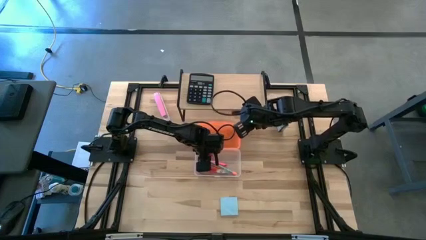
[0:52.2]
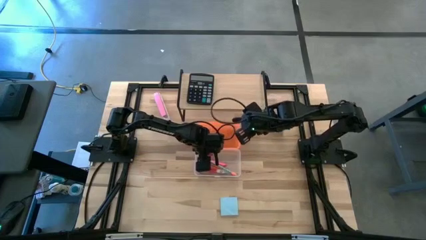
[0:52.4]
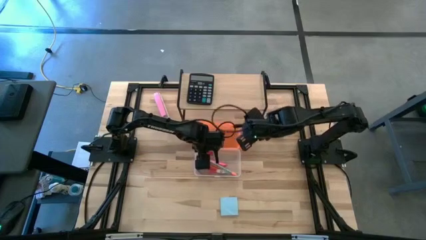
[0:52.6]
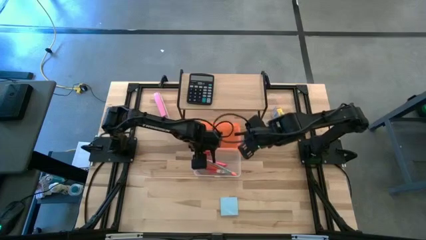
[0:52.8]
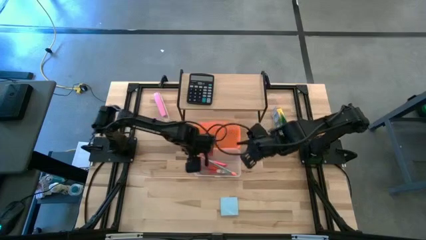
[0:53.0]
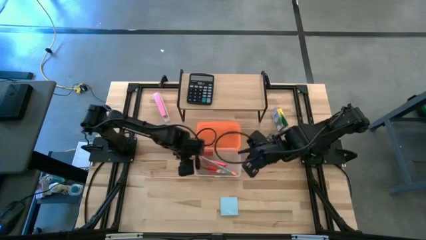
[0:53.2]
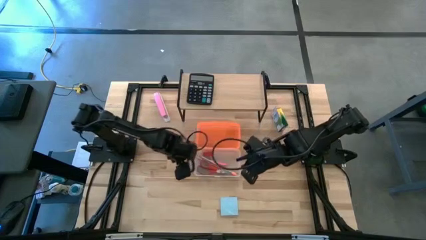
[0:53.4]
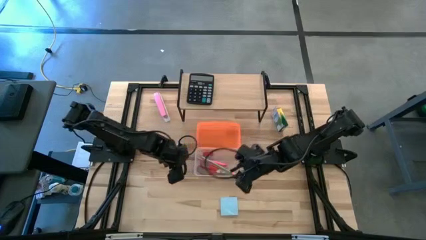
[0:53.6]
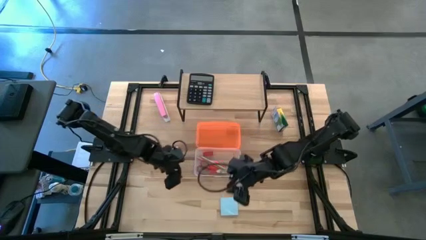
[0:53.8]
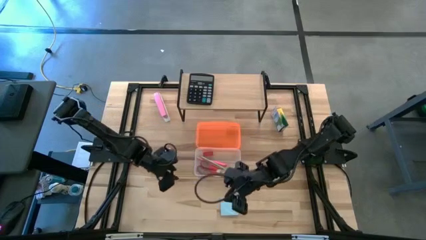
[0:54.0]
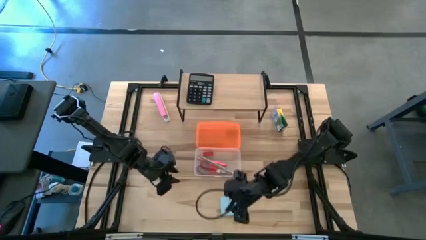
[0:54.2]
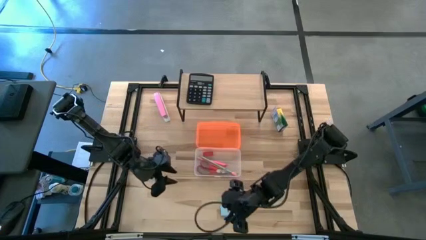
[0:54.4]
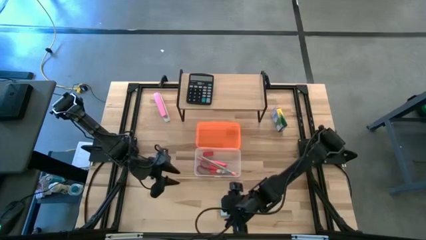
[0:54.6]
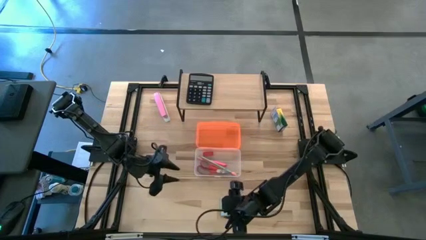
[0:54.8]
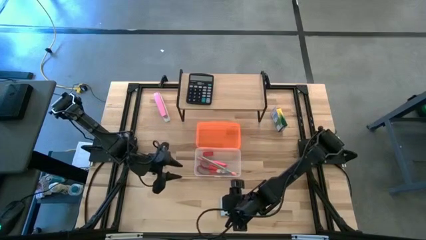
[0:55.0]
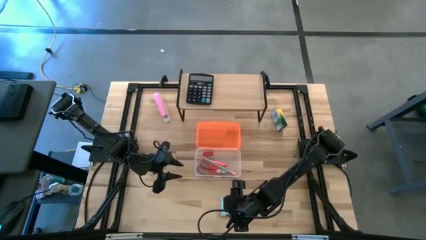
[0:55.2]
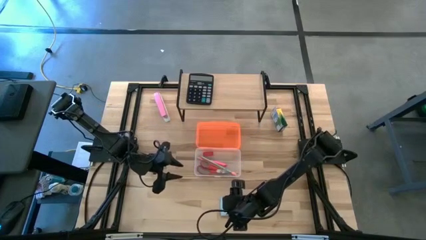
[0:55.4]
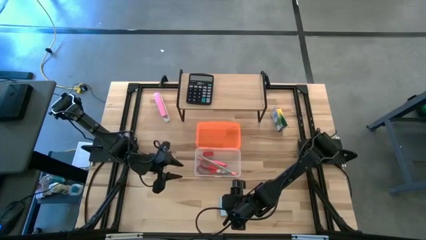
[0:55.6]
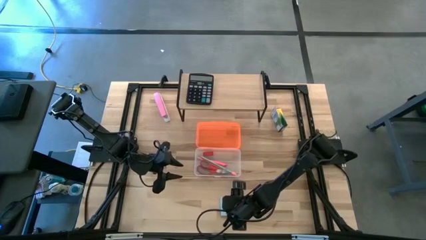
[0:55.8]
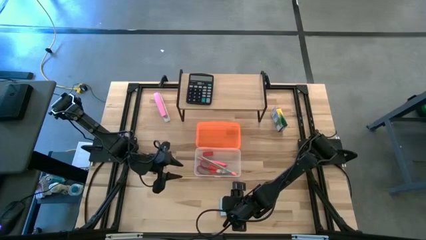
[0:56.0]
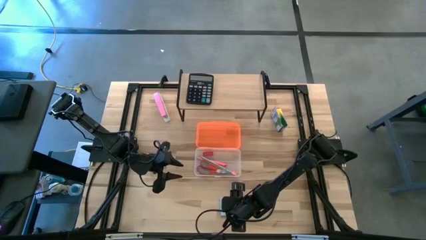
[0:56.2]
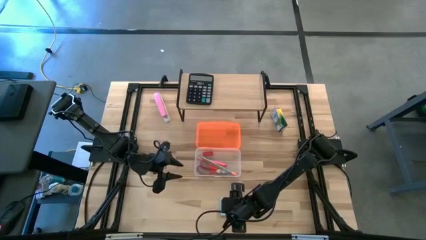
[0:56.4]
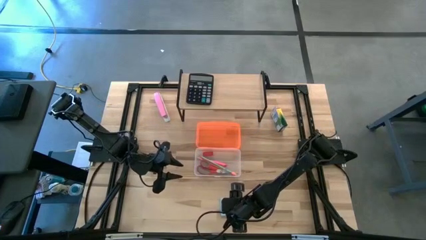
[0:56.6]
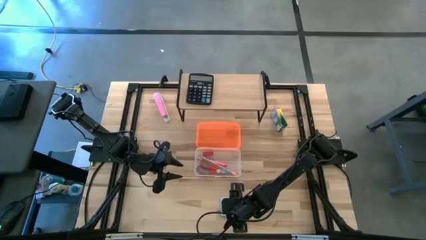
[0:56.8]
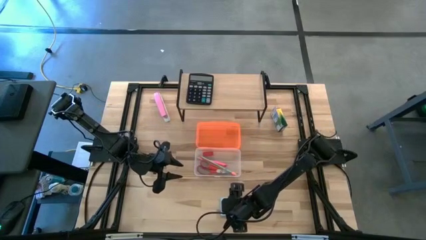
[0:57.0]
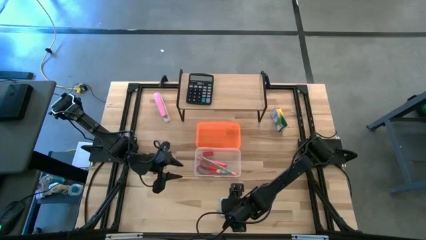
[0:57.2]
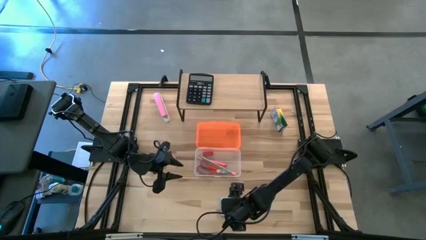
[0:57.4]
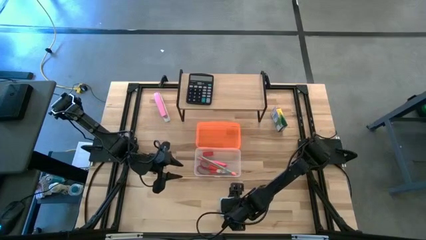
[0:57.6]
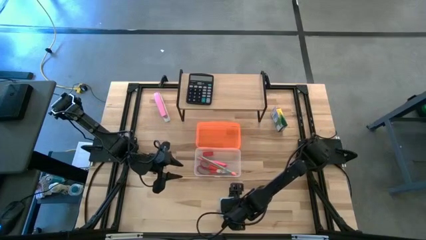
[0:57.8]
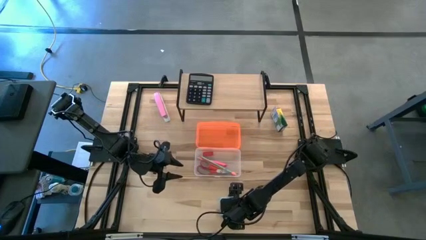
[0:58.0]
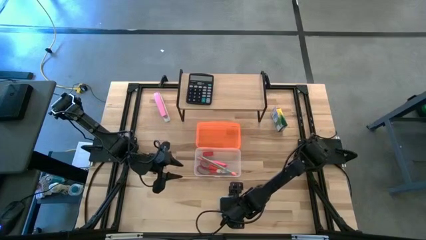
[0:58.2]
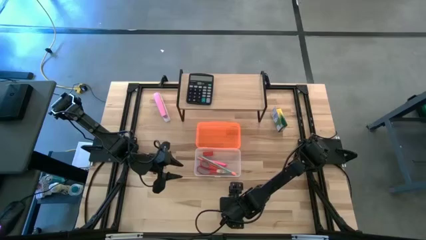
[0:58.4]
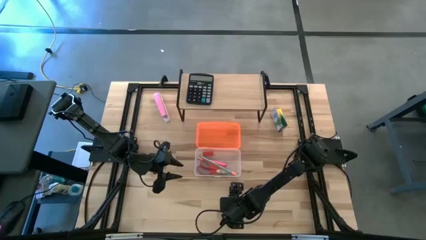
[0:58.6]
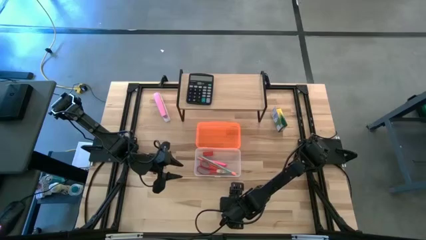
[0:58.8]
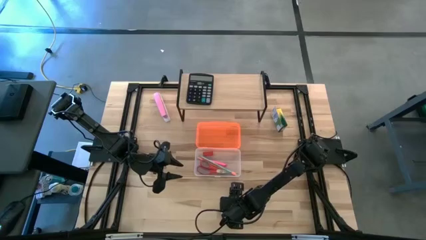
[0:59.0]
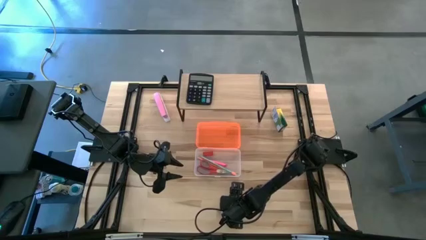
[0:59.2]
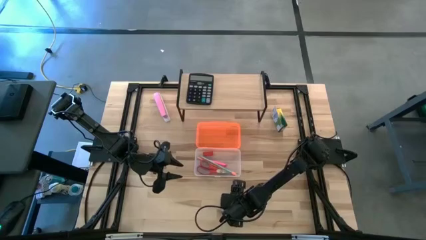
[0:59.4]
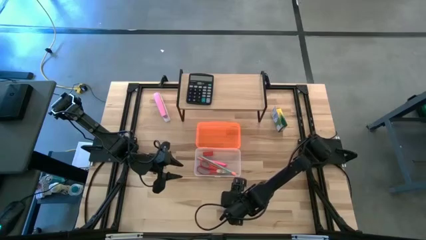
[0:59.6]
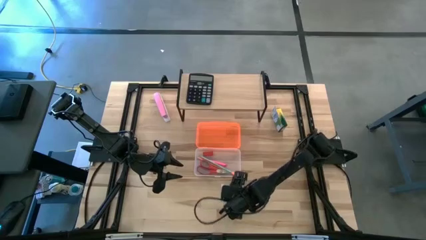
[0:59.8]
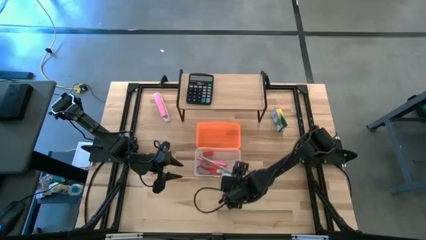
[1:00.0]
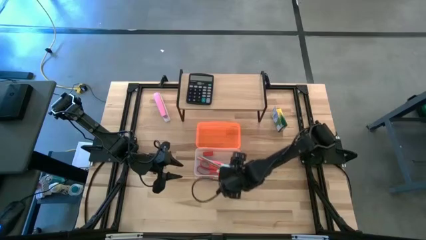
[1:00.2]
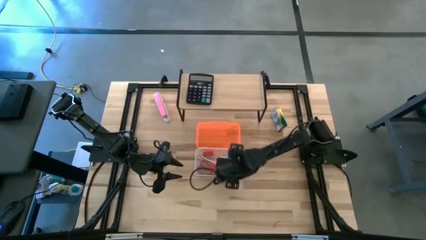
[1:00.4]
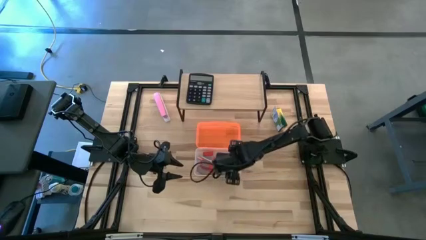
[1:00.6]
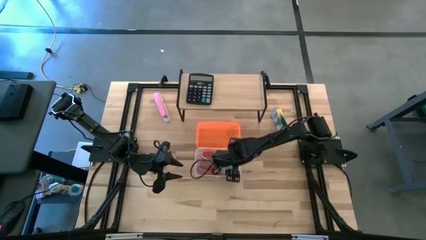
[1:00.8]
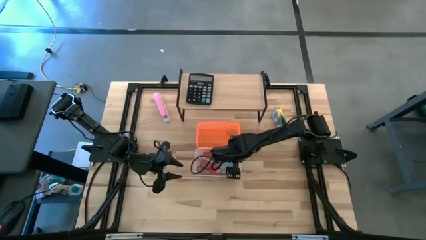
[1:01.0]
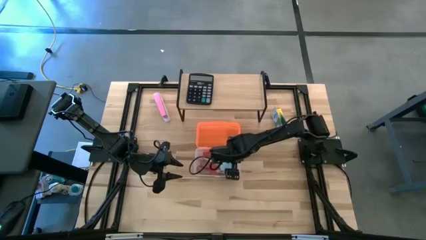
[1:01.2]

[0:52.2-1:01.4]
Task: Pack school essentials
Put the blue sticky notes into the supply box

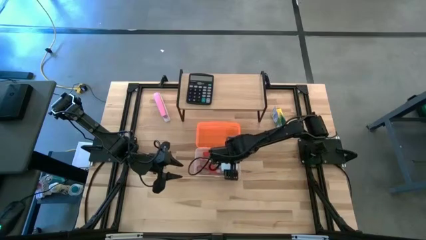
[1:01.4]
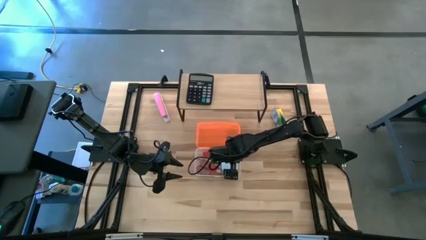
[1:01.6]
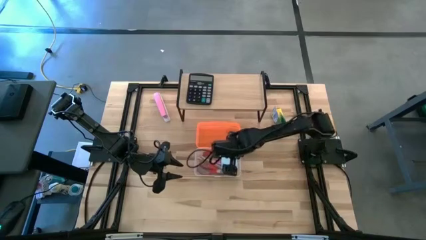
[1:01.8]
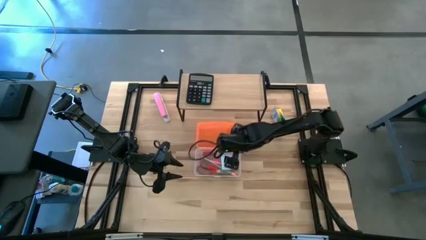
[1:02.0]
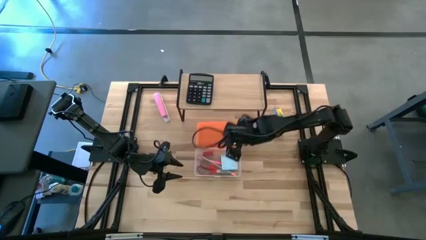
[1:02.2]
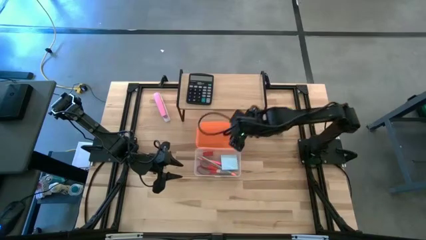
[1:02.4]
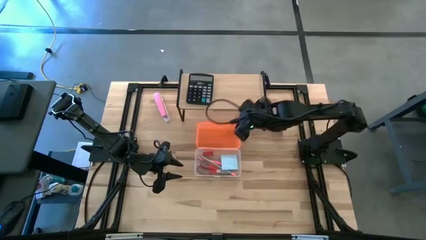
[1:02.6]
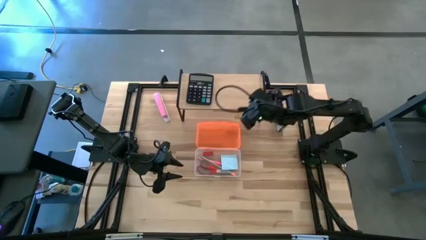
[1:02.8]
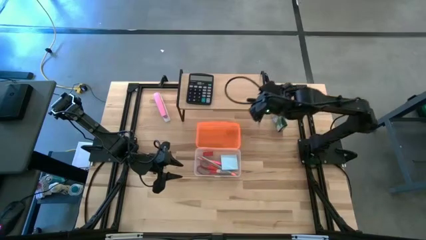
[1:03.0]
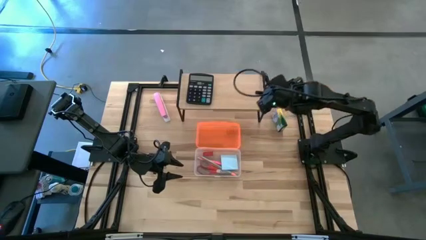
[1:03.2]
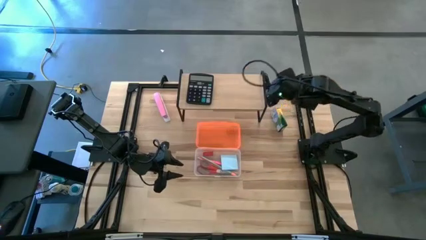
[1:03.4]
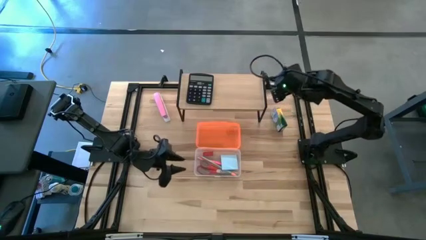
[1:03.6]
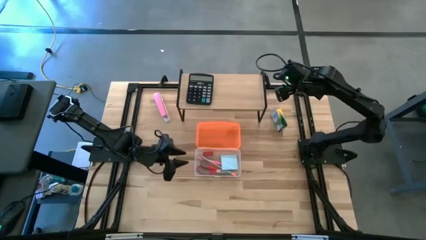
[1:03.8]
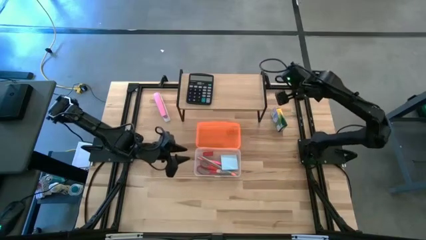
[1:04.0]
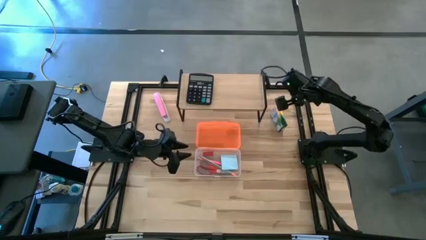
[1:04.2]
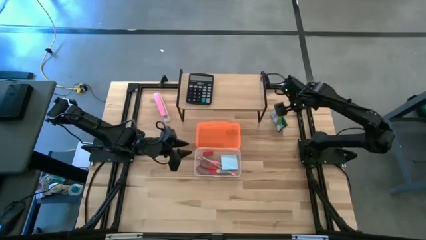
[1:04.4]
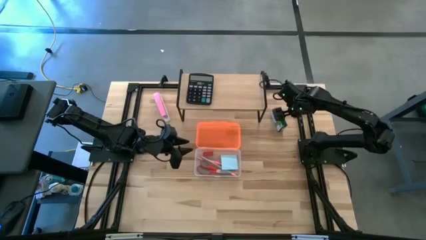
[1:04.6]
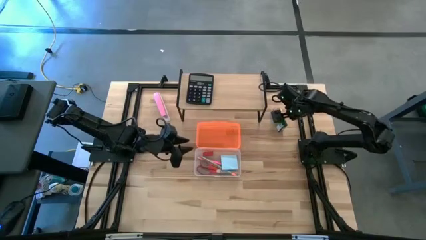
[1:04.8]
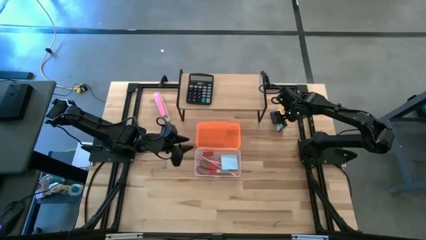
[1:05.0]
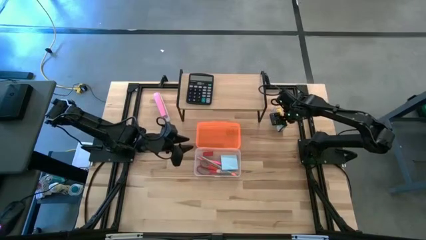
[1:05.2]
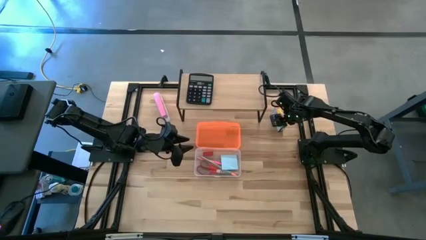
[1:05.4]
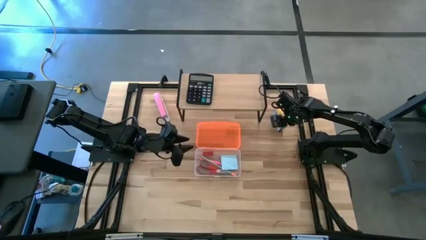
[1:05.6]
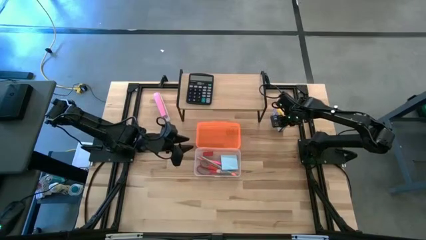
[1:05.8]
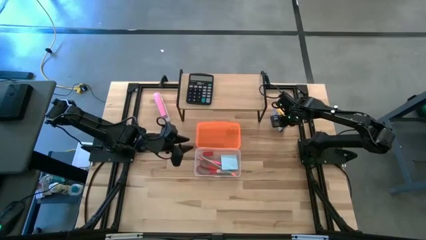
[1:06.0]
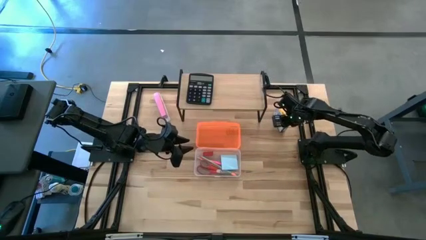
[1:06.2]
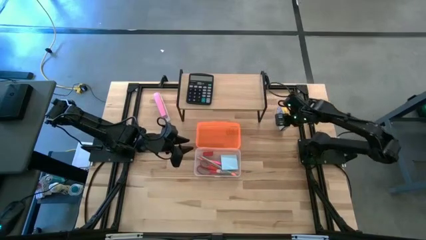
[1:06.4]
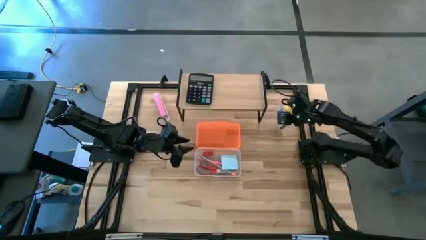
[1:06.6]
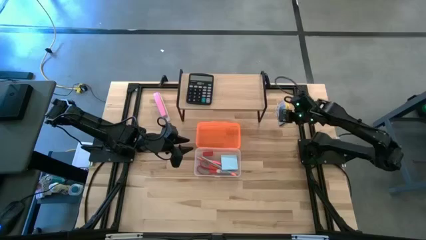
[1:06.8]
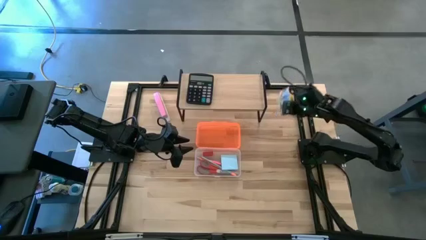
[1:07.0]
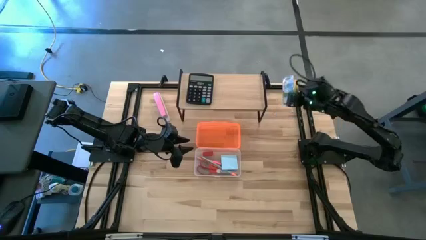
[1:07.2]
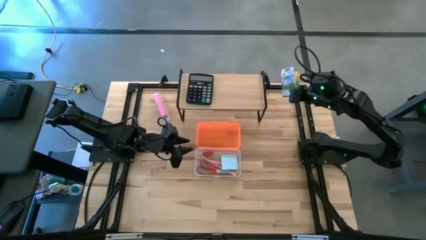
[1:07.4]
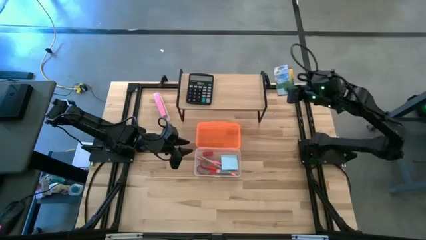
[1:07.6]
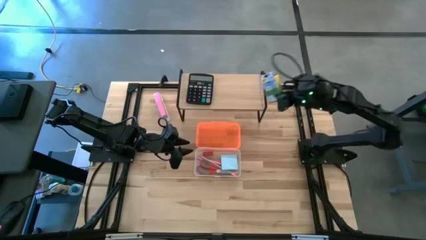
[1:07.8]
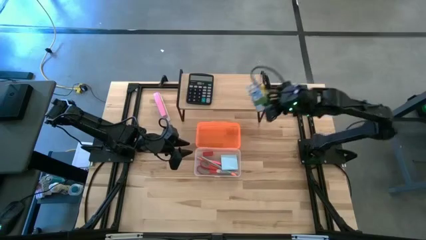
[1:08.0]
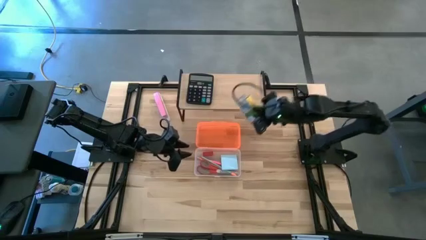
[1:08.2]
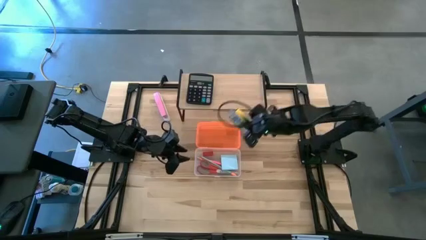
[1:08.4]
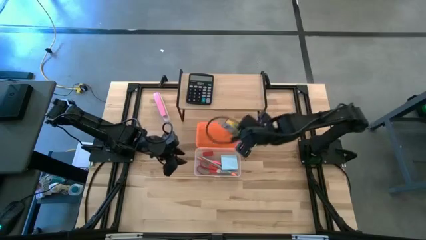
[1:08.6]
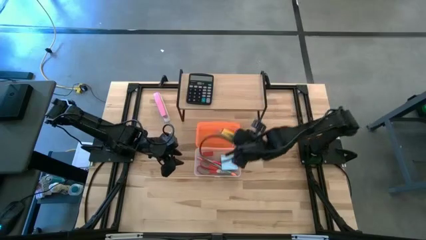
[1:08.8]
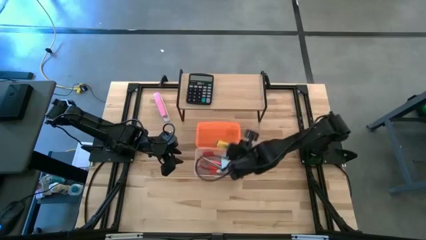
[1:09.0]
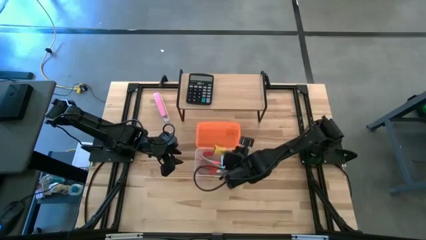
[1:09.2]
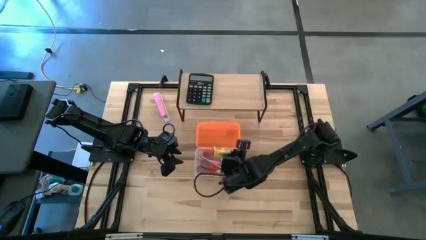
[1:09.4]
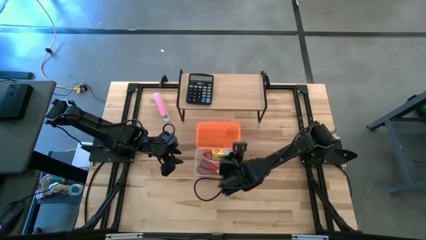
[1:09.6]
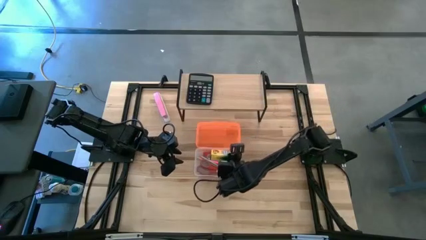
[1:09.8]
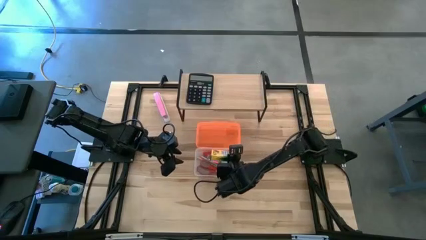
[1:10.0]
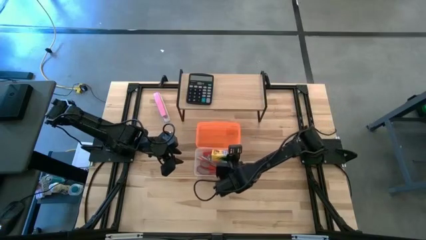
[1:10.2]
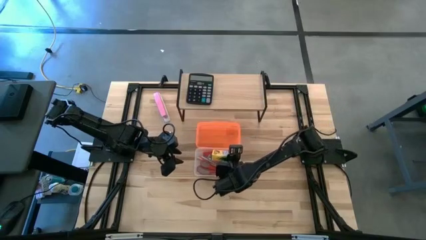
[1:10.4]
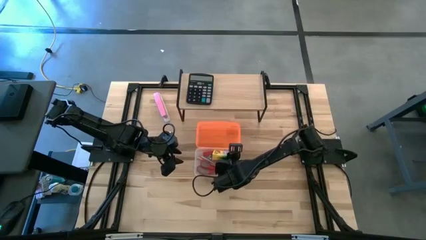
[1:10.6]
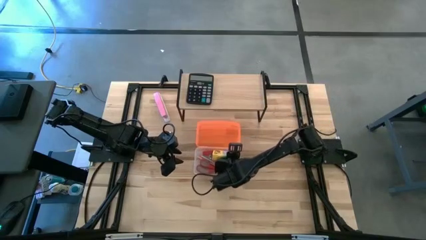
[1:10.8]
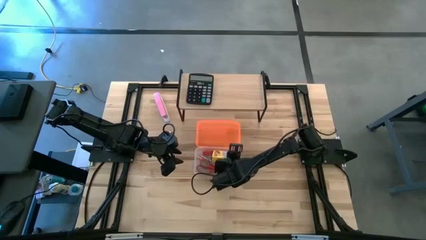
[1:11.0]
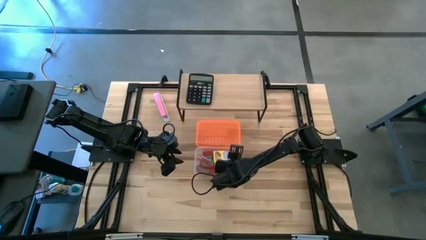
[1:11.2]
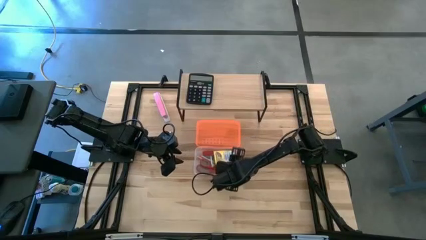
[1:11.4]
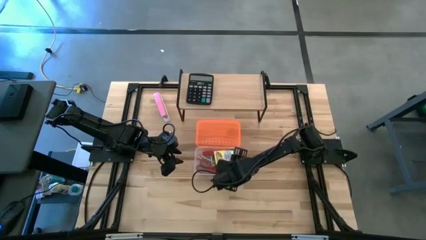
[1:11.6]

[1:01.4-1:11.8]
Put the pack of crayons into the supply box
